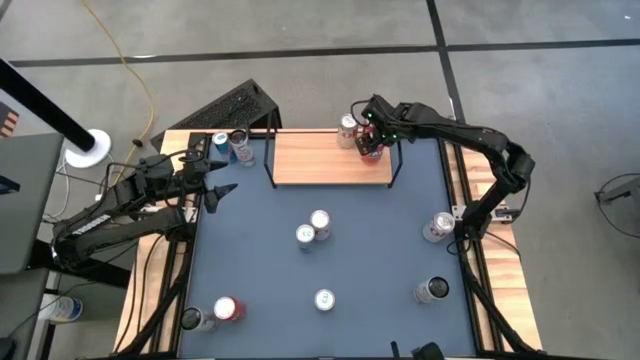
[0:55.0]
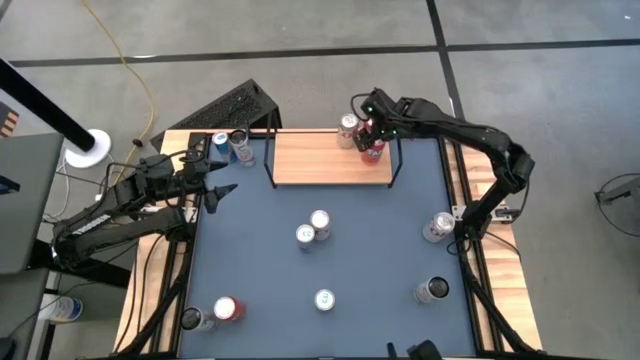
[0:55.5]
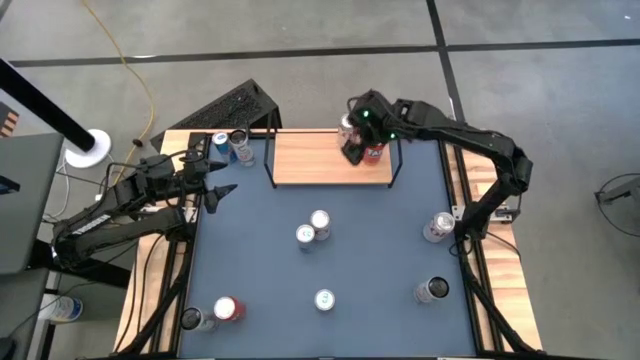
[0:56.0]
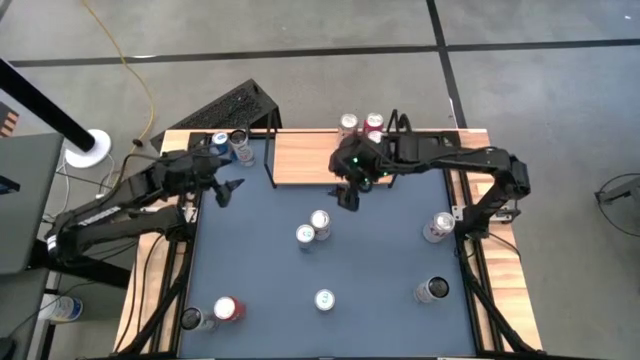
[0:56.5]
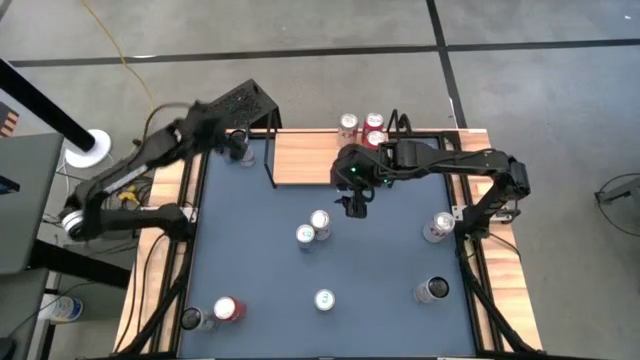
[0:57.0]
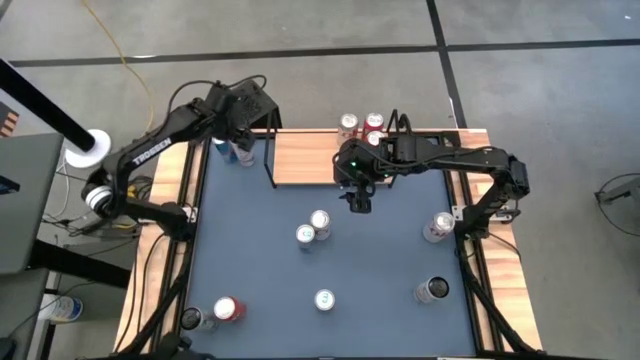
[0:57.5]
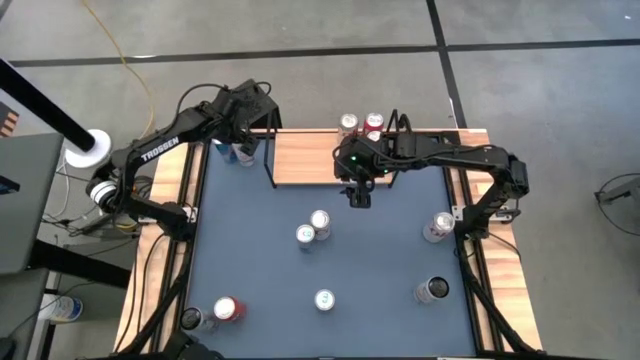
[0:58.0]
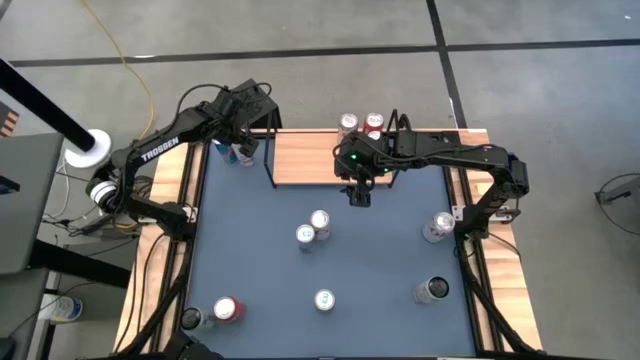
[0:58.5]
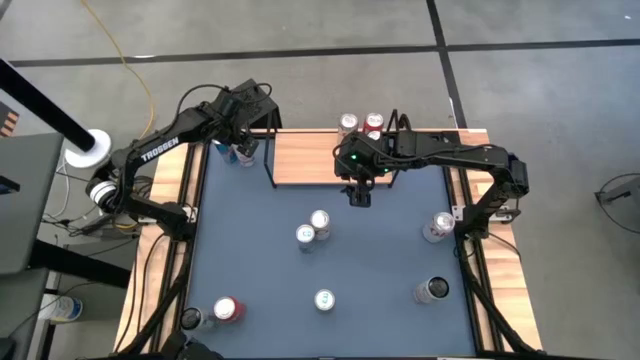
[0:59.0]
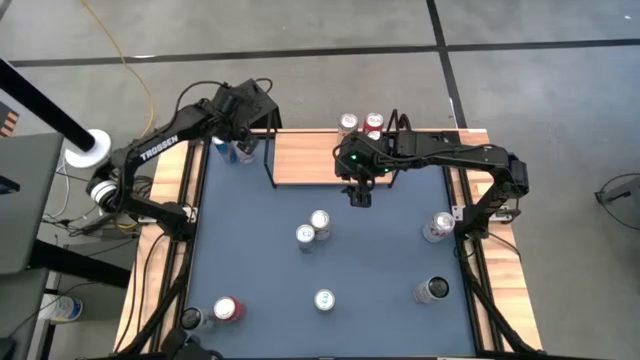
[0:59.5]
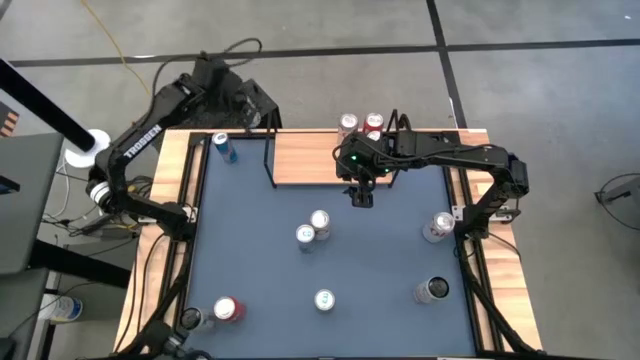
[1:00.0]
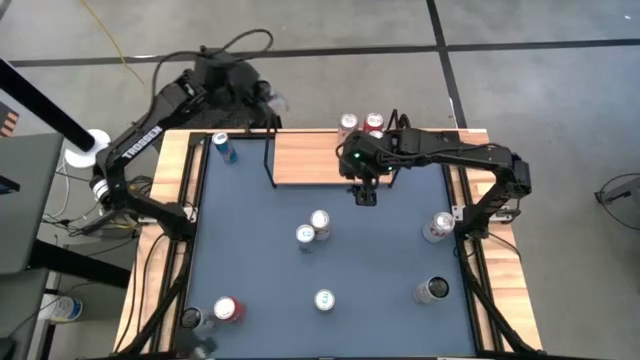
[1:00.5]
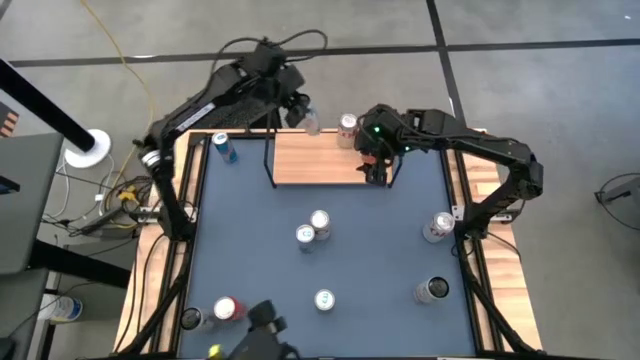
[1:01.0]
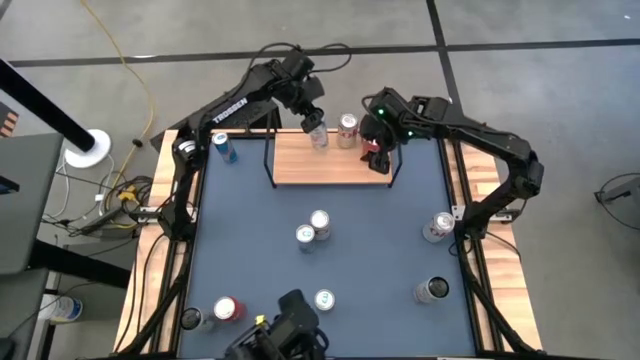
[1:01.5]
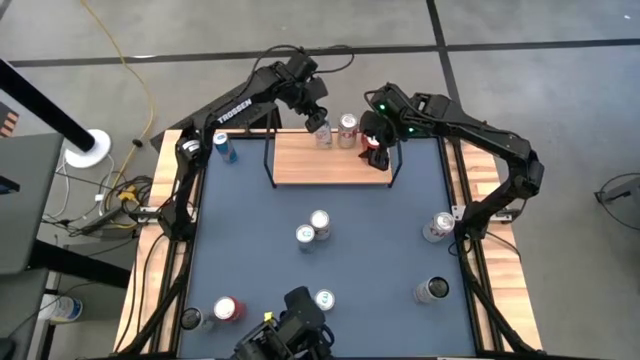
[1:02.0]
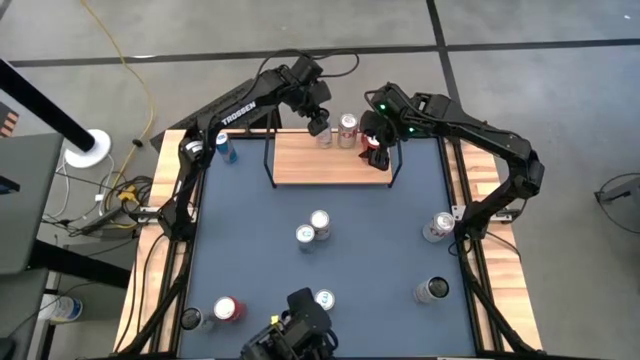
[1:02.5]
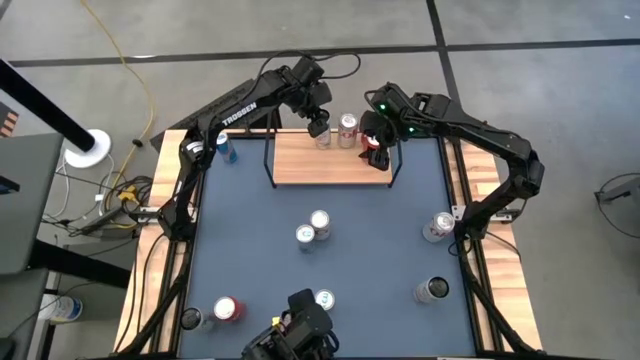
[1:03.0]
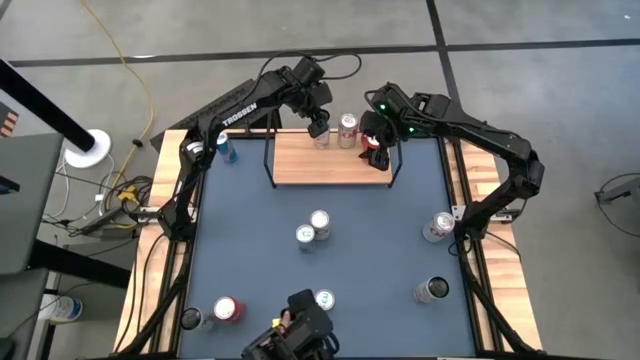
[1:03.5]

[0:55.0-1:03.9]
Task: Place canned beverage on shelf
Put the top left white-pink soda can on the shelf

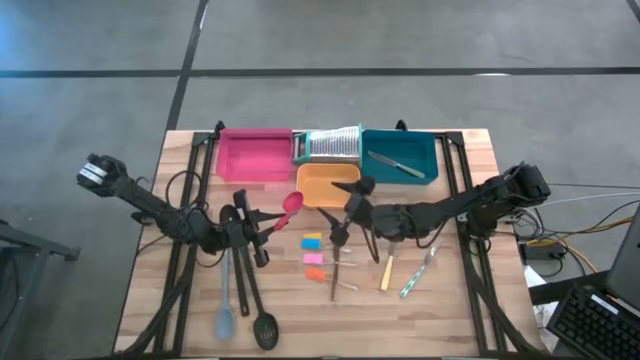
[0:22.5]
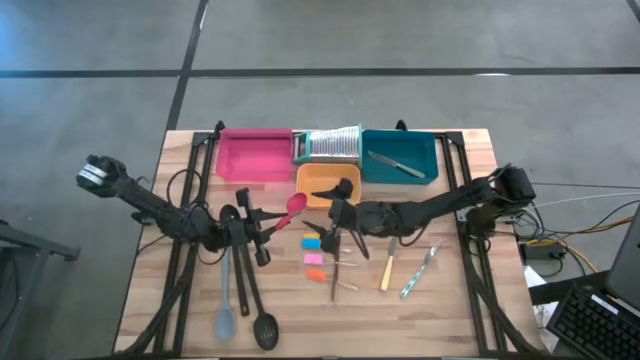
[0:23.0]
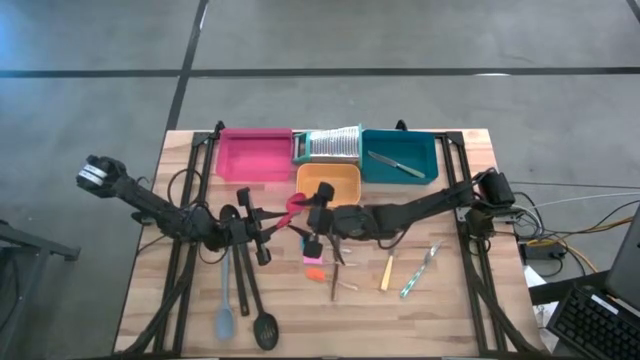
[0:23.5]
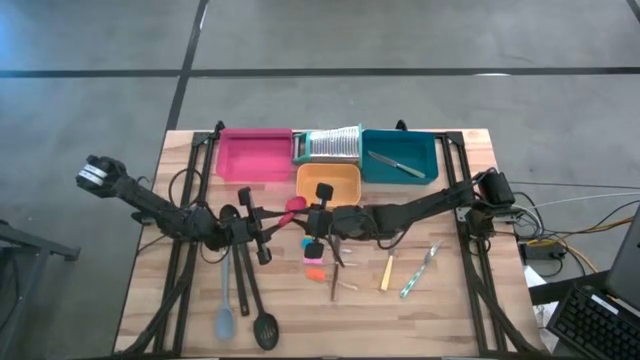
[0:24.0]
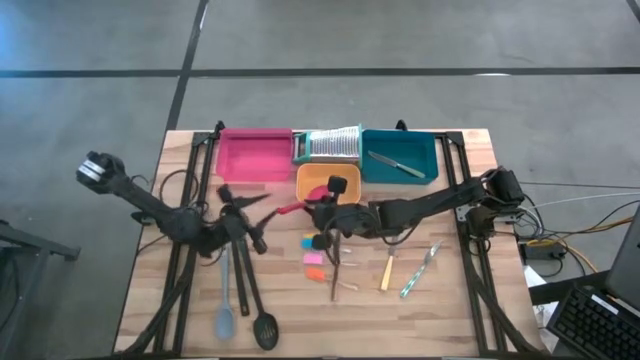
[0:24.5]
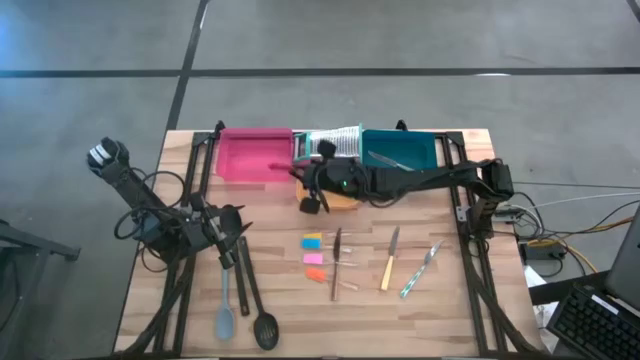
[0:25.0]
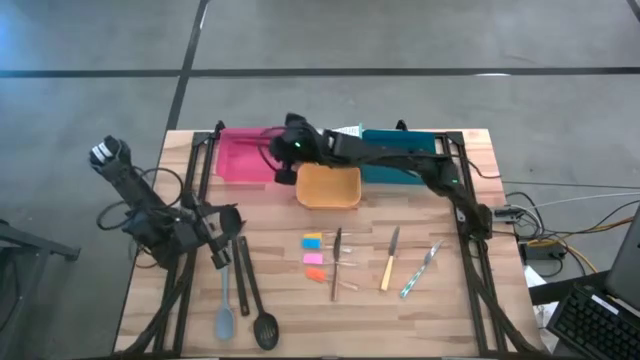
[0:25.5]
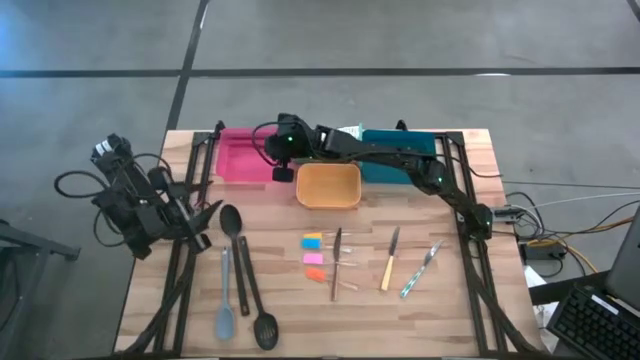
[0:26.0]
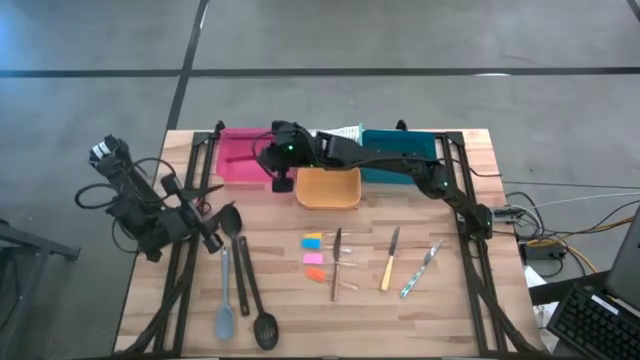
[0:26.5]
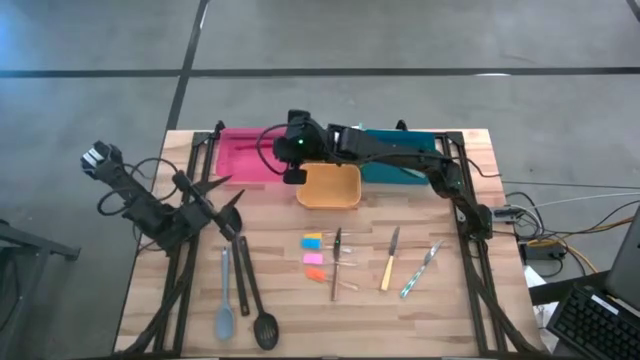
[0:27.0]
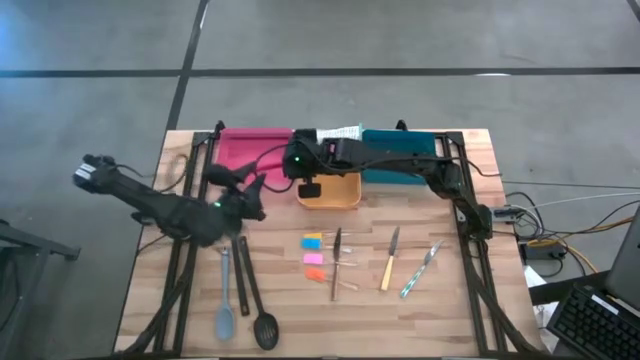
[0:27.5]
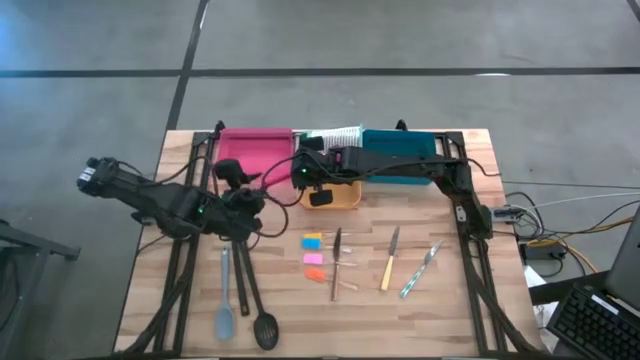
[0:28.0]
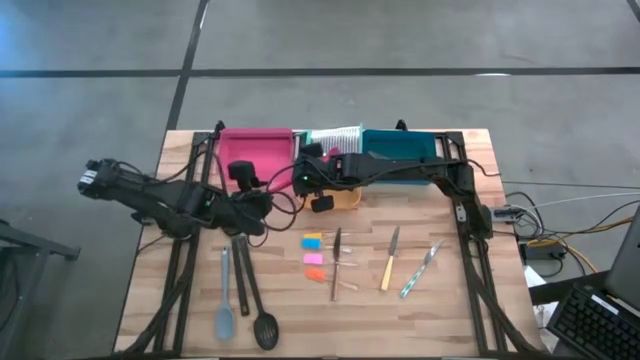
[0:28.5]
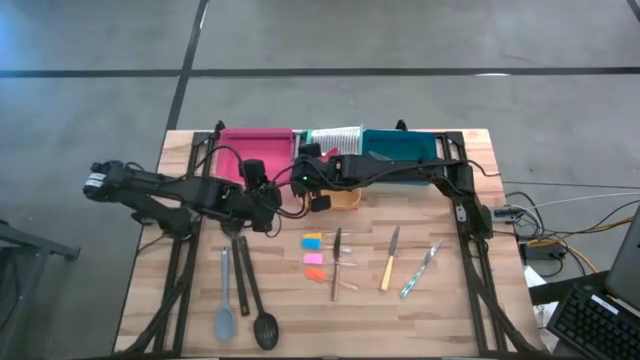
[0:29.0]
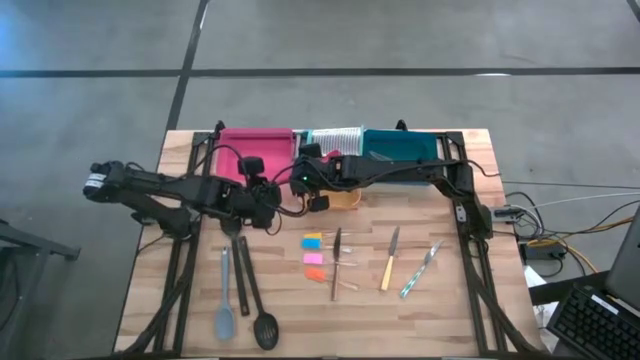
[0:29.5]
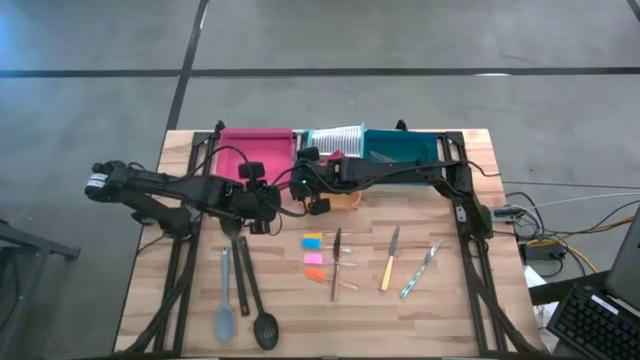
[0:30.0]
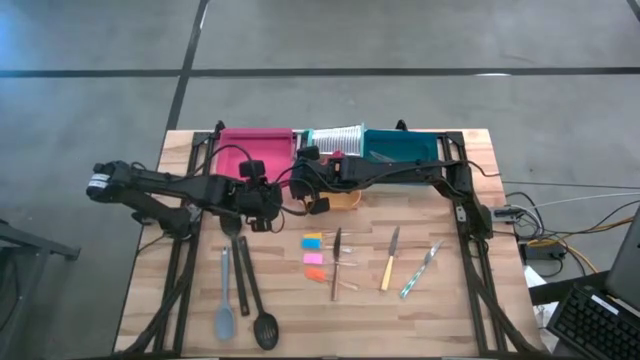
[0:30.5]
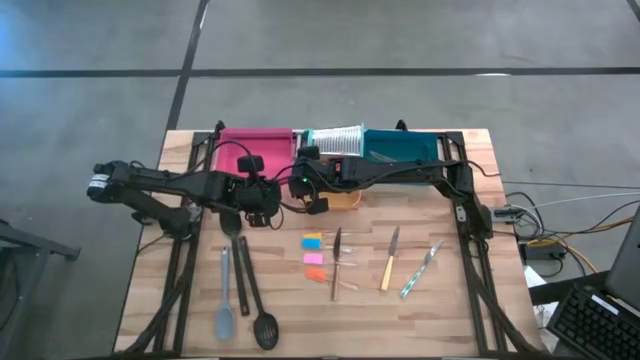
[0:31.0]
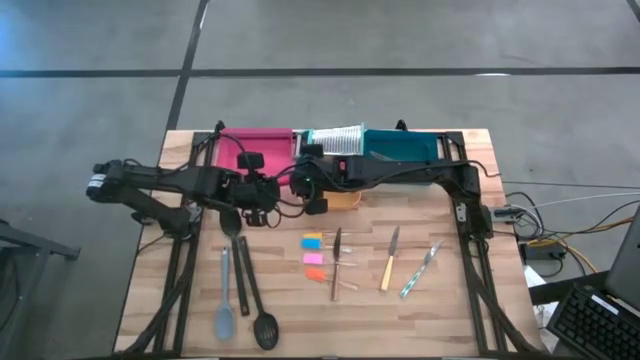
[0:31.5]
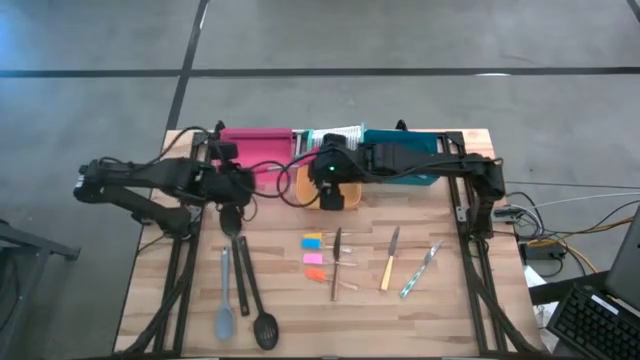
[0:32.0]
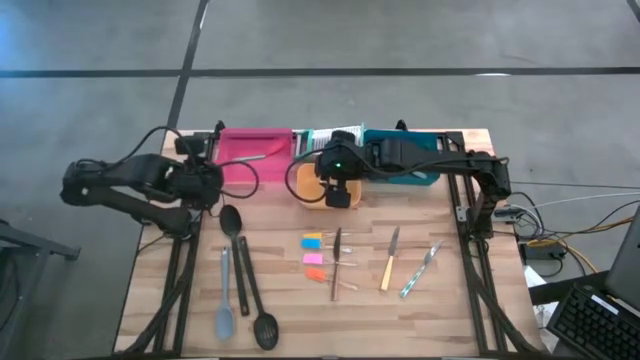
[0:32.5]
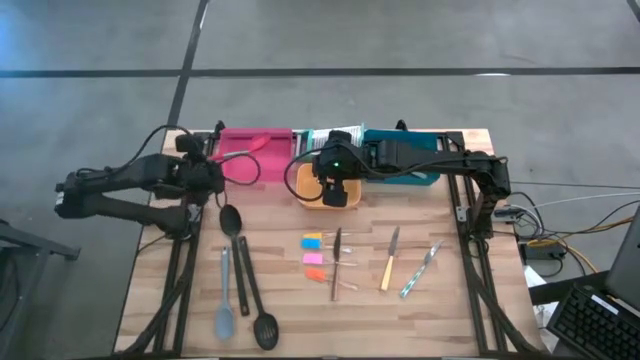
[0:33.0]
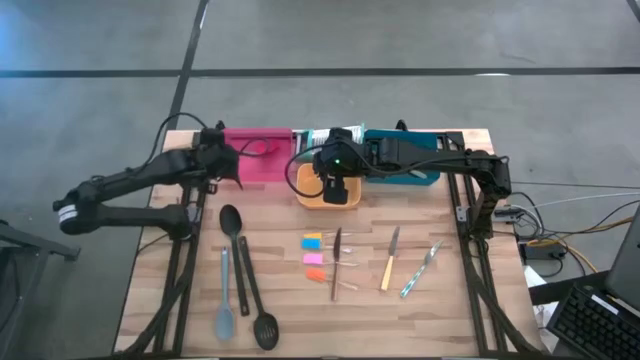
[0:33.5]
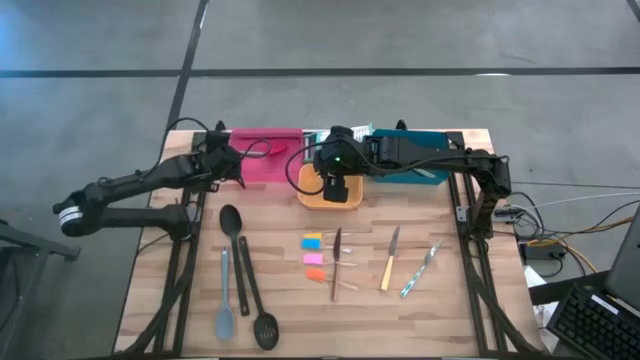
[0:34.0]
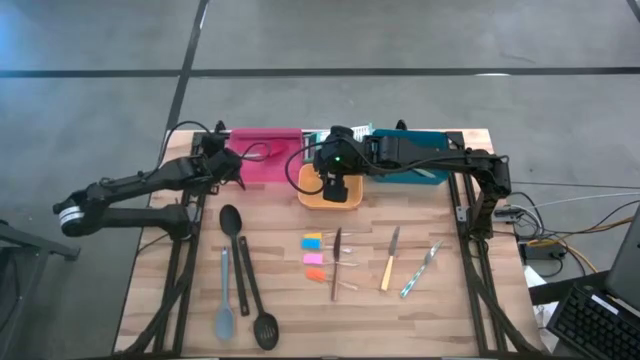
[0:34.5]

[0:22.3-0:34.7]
Task: Pick & Place Kitchen Items
Put the red spoon into the pink bin
